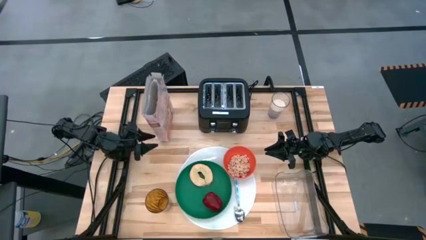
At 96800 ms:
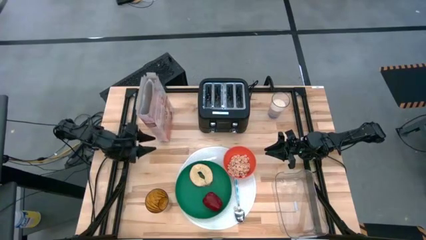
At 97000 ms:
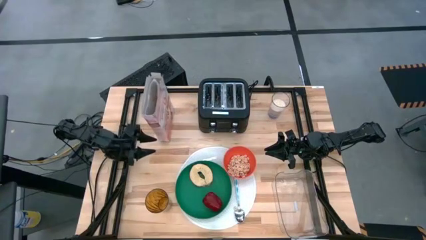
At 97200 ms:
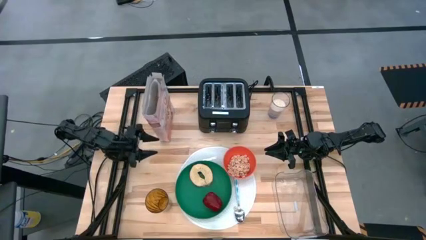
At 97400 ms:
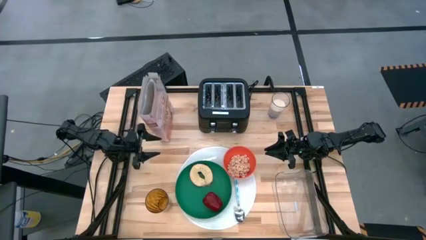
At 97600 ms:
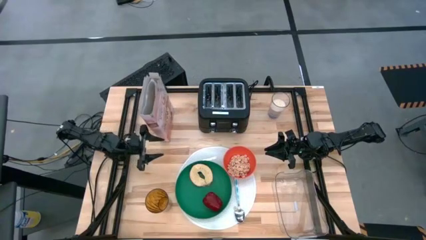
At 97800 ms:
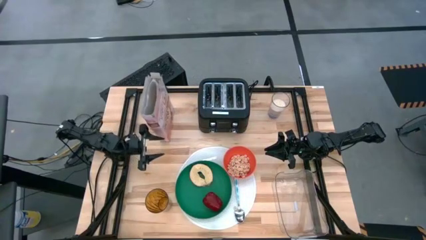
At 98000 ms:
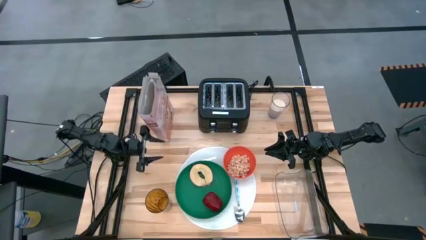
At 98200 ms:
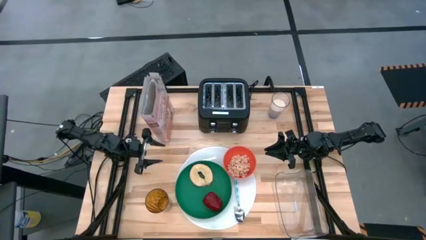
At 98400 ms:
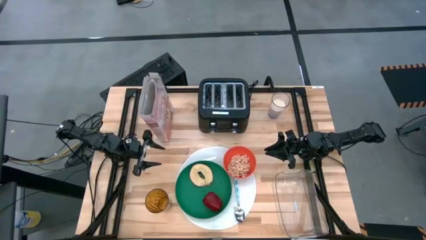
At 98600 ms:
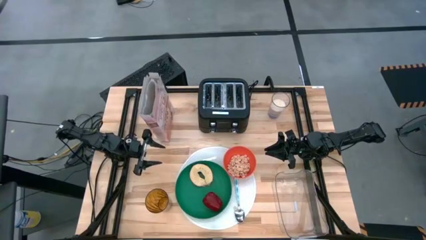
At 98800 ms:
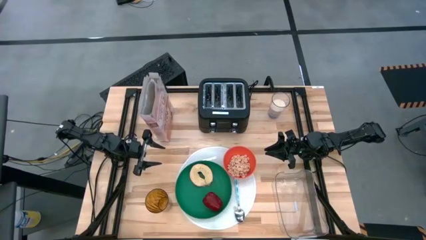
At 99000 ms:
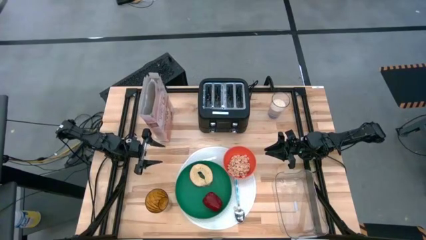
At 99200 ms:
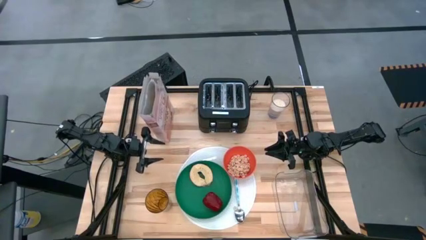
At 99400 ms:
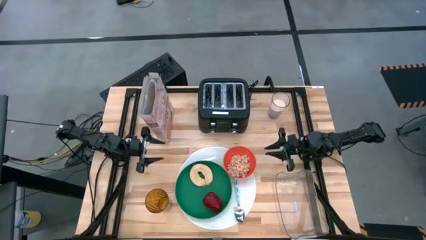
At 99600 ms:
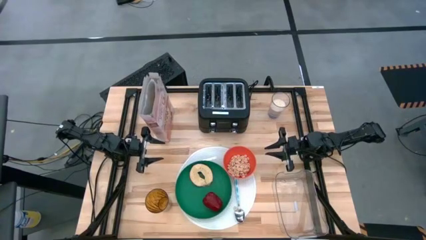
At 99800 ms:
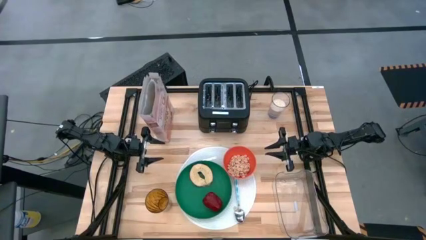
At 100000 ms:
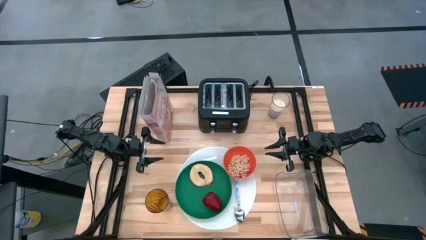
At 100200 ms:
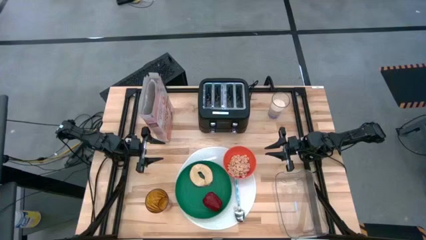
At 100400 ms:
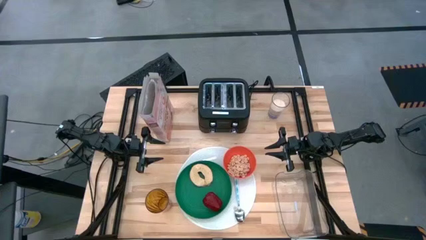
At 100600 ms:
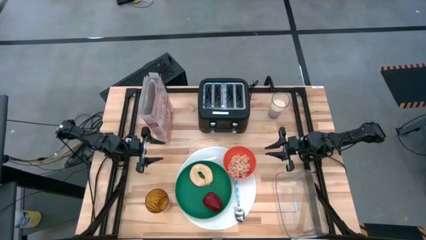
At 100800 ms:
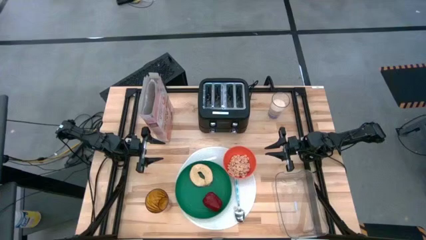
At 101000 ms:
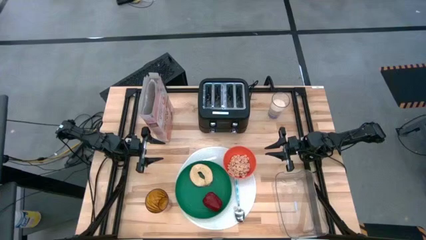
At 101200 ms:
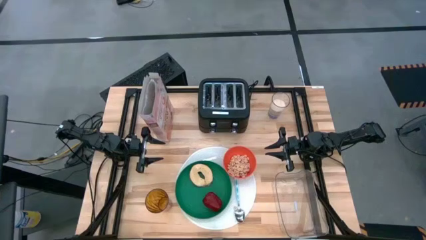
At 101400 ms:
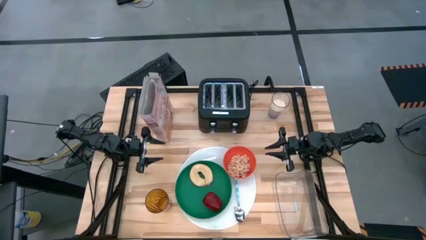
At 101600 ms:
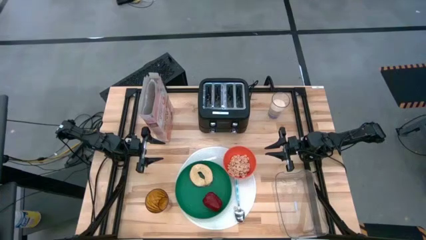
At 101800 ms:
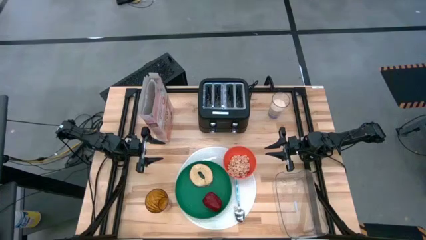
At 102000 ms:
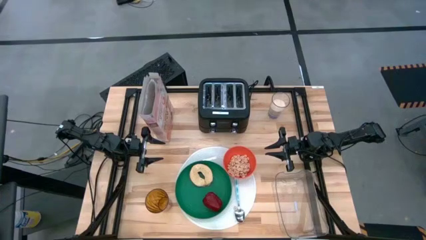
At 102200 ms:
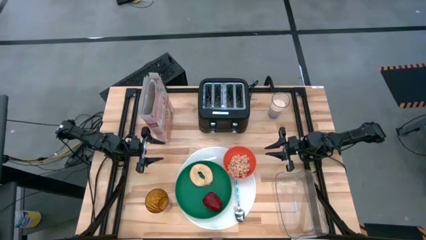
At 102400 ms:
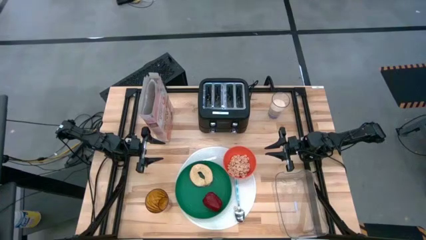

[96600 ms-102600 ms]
Task: Arrange a breakfast setting
Return to Home Position

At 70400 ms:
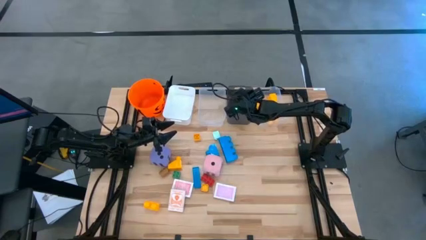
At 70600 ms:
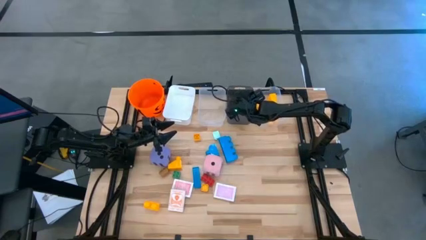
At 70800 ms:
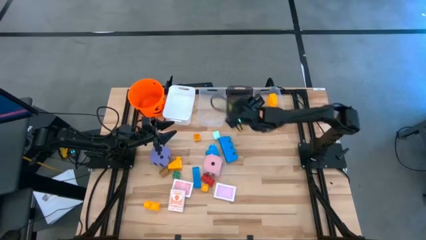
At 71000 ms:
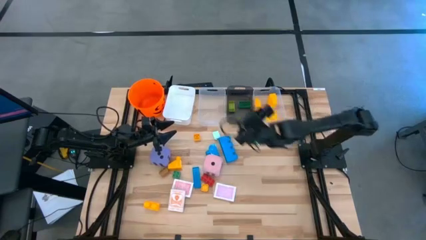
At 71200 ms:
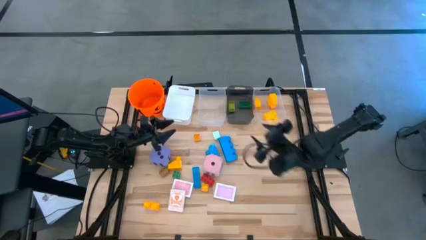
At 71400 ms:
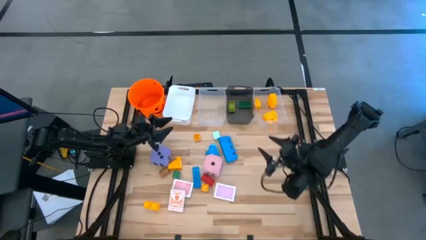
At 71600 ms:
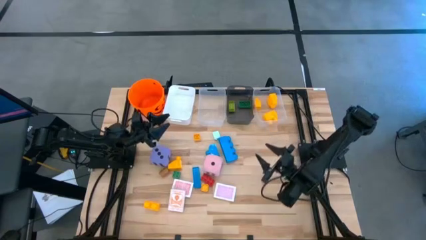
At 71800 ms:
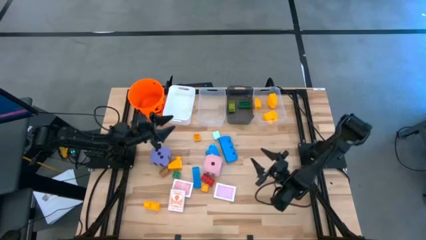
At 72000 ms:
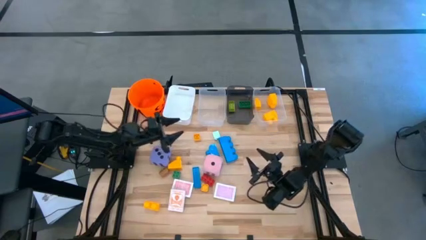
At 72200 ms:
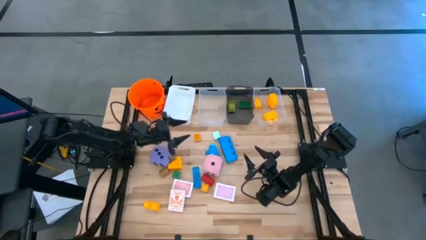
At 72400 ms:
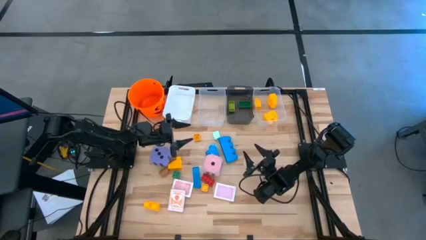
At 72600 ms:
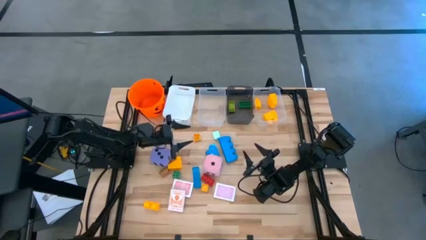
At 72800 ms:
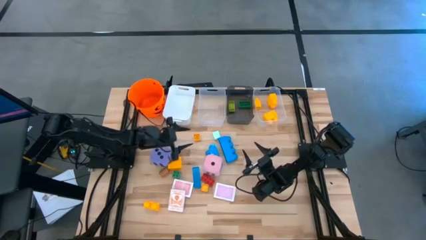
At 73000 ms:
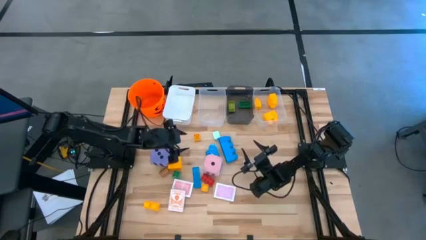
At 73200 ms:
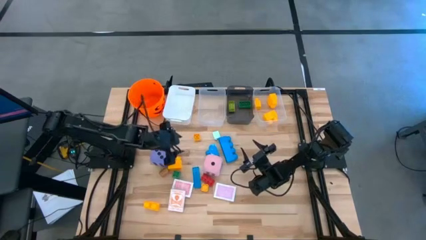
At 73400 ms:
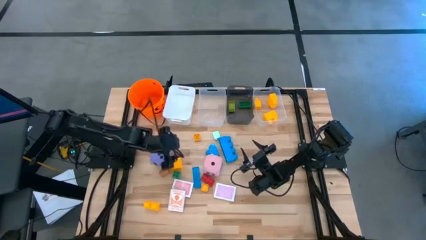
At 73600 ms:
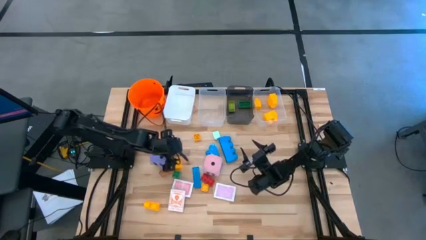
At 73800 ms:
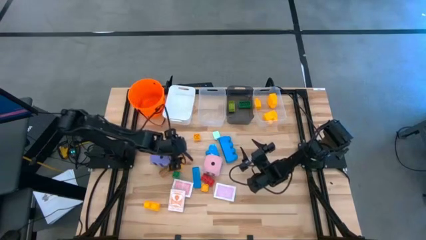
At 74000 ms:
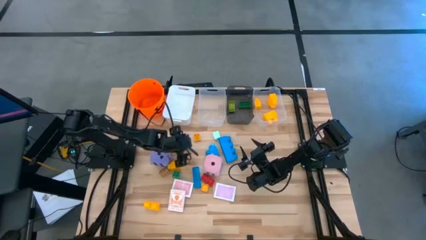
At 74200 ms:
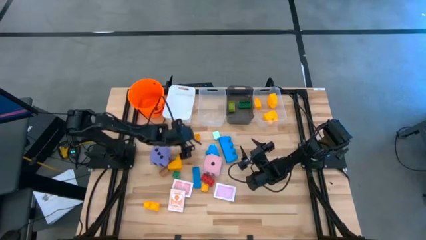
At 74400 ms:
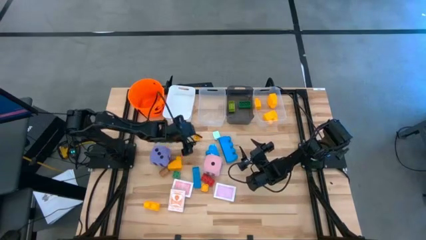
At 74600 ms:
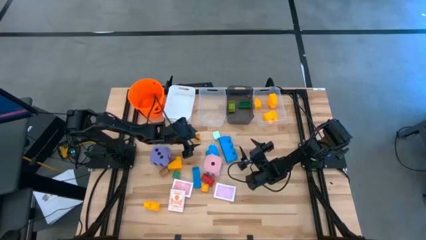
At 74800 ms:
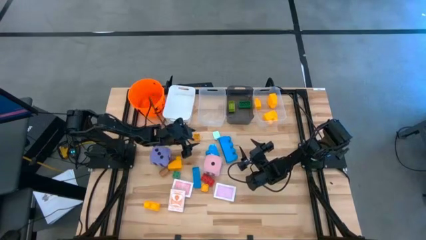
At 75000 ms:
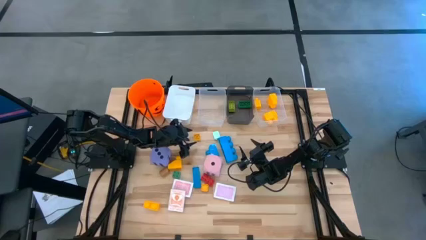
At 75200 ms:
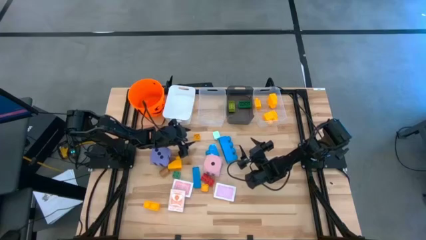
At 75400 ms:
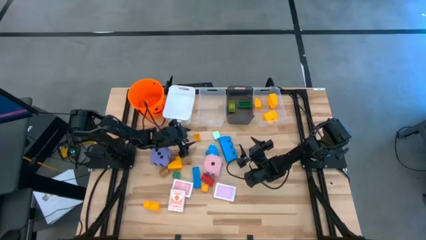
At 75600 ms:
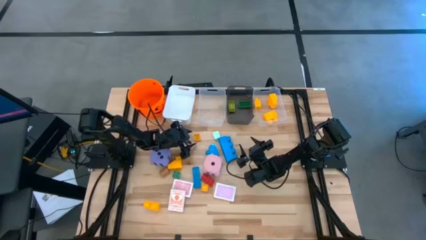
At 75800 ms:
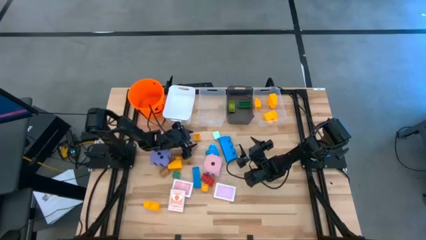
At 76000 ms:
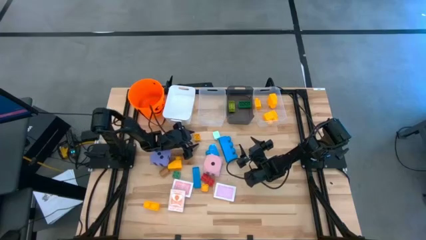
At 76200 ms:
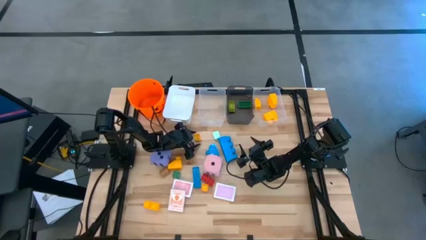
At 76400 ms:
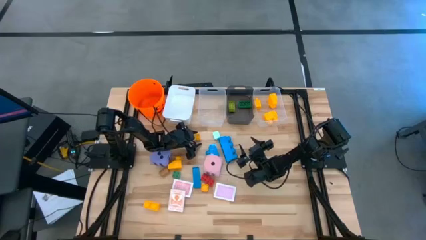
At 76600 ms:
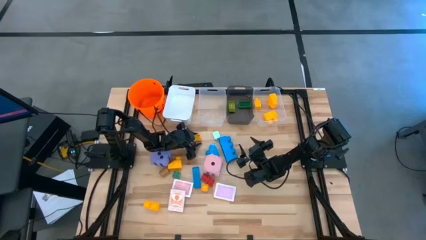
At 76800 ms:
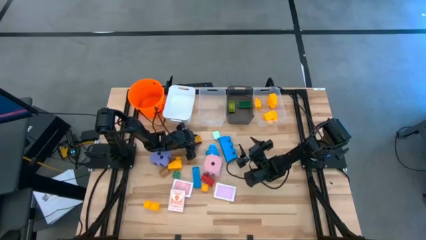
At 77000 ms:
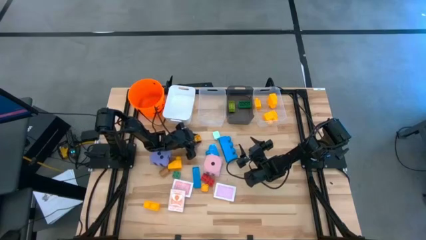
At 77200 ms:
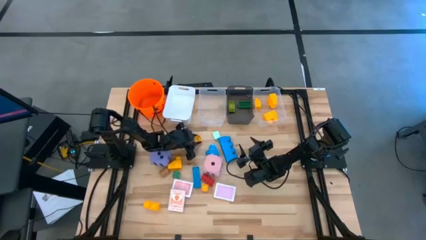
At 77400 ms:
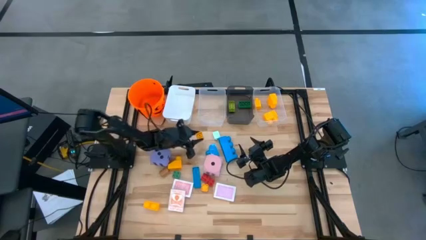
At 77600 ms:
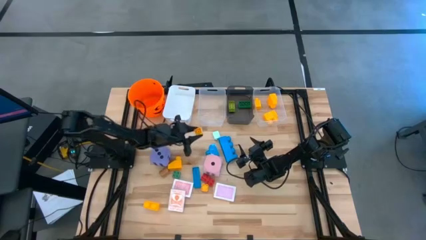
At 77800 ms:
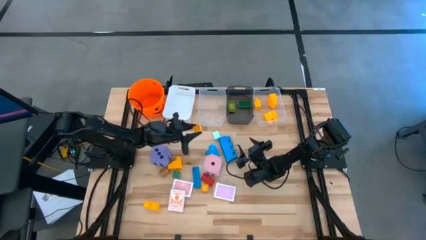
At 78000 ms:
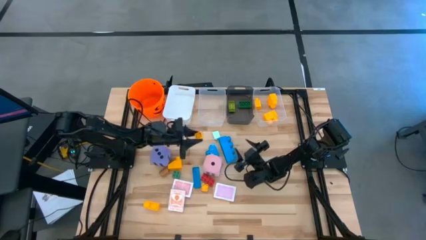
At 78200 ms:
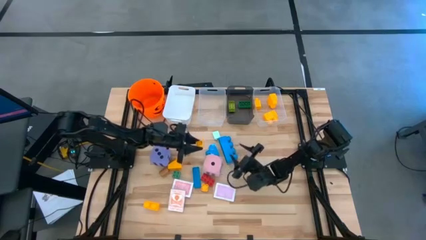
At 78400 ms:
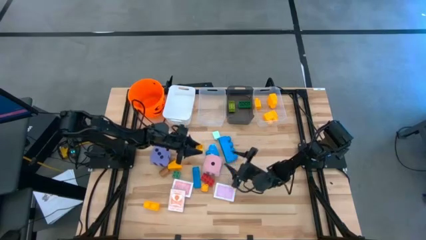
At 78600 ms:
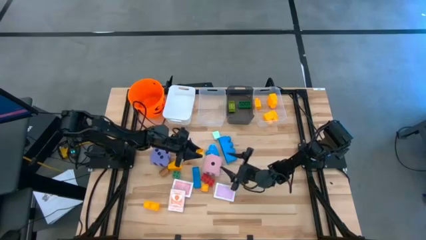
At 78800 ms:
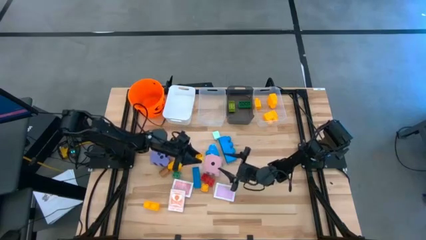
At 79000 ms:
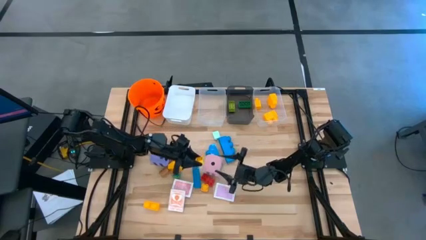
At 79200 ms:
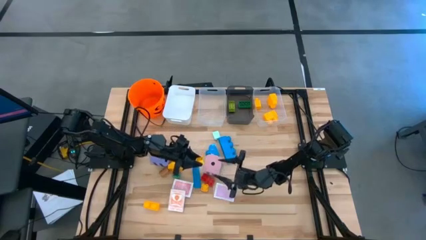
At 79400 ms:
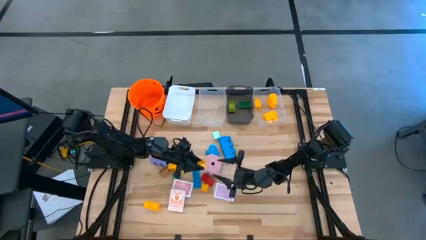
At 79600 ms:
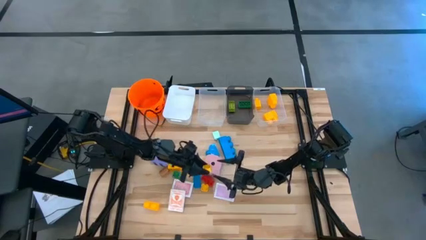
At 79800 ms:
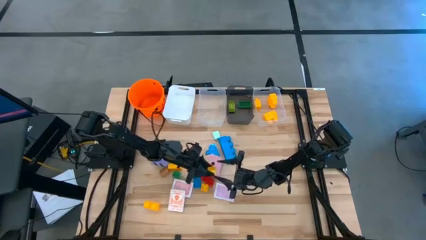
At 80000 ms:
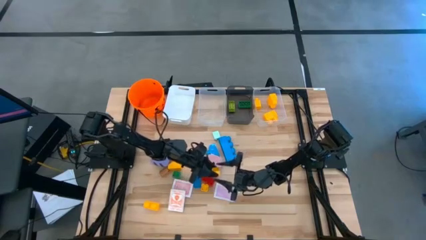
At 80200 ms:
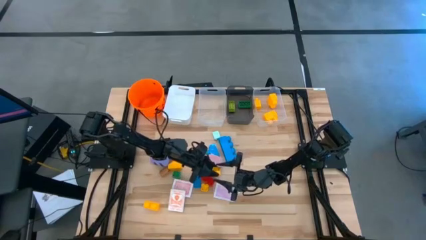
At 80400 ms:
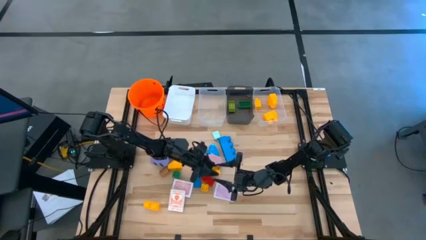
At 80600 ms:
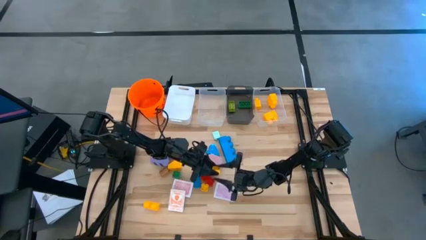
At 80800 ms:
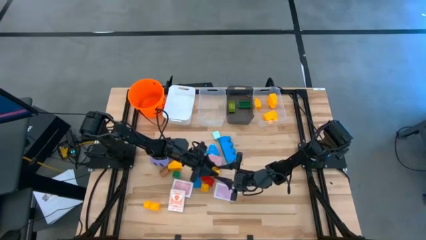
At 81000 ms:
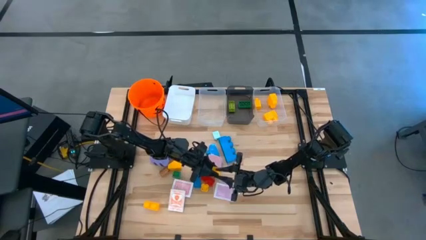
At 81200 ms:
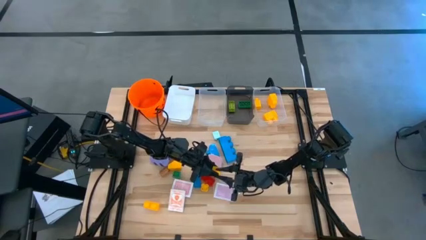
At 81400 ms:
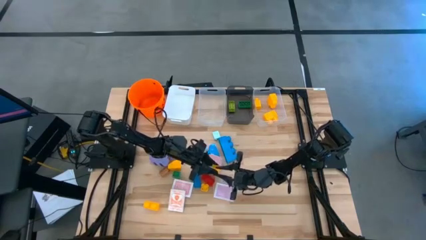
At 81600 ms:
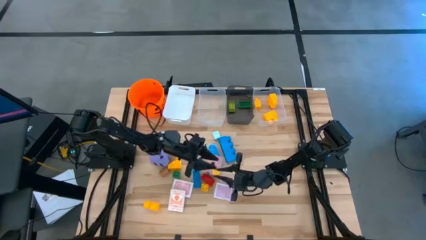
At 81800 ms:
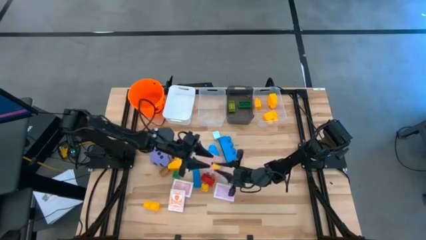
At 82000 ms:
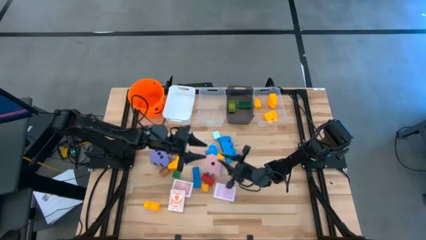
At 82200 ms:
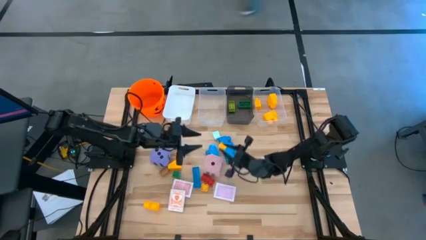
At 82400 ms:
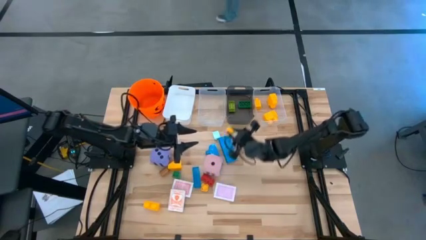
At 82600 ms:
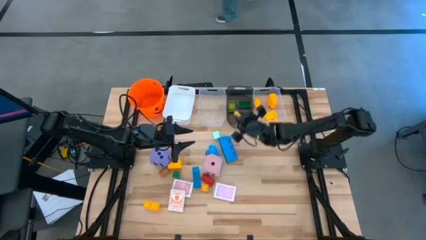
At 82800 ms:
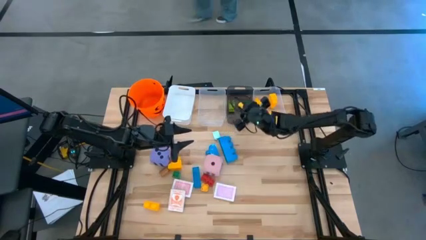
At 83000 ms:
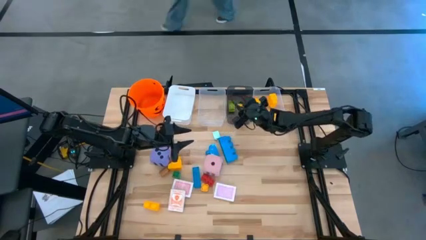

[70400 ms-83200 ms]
Task: Pick & Place Toys
Put the small yellow game piece into the black bin
